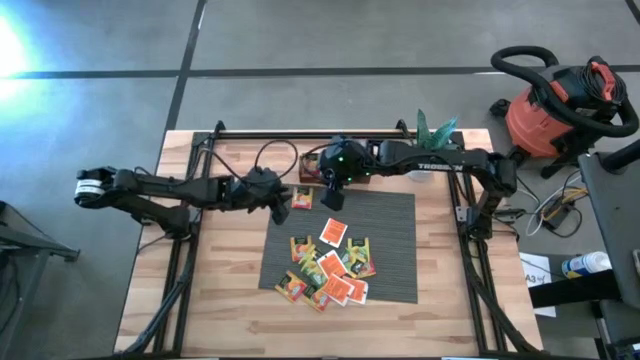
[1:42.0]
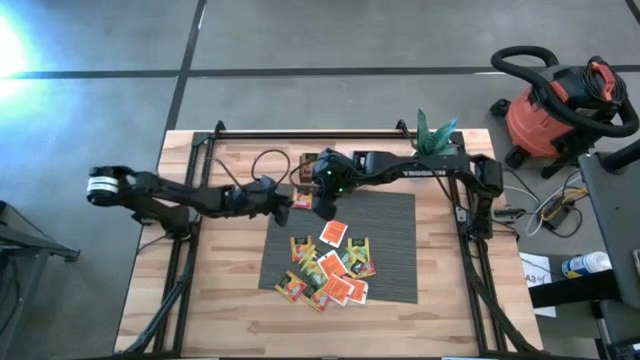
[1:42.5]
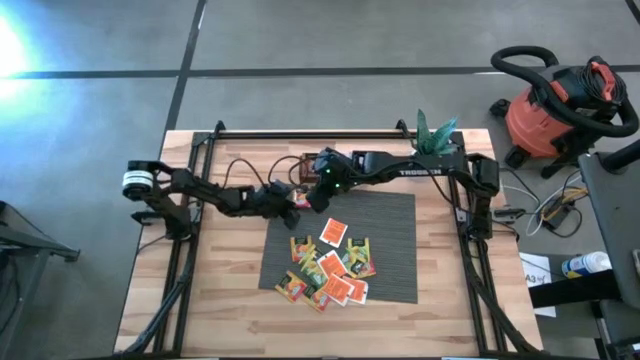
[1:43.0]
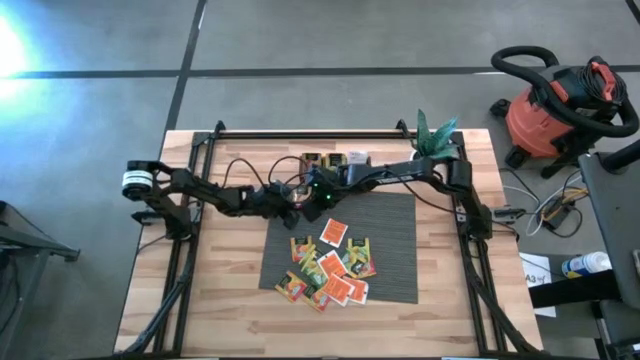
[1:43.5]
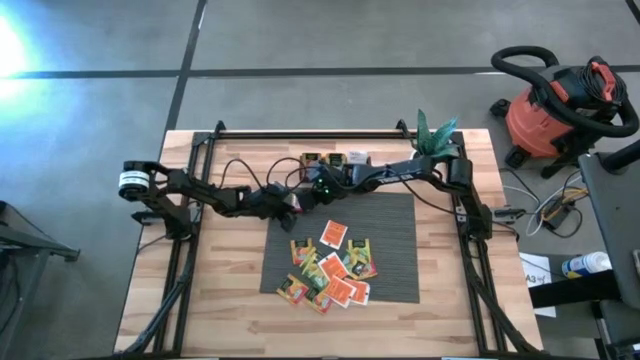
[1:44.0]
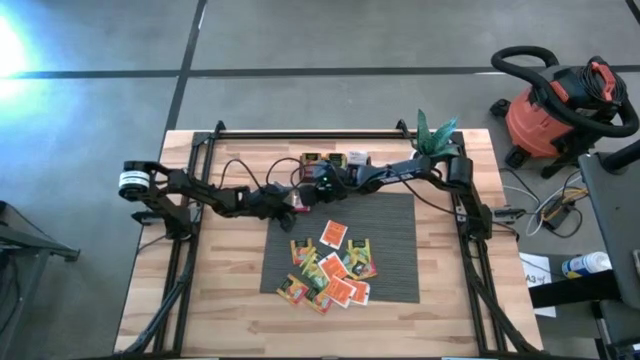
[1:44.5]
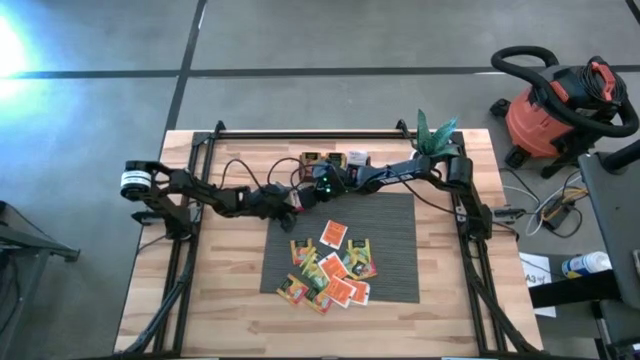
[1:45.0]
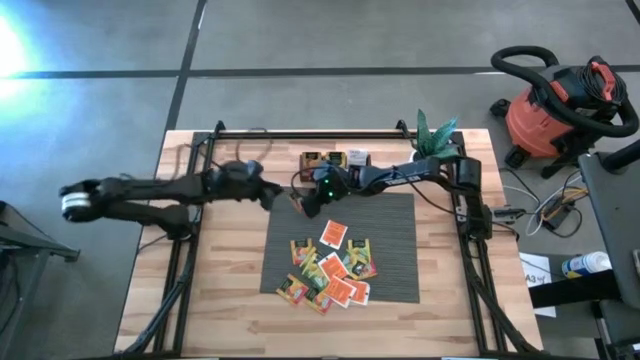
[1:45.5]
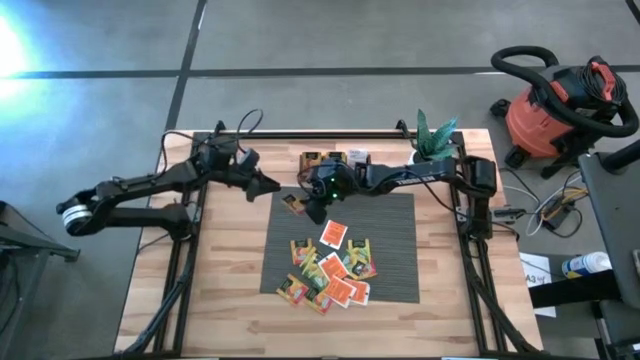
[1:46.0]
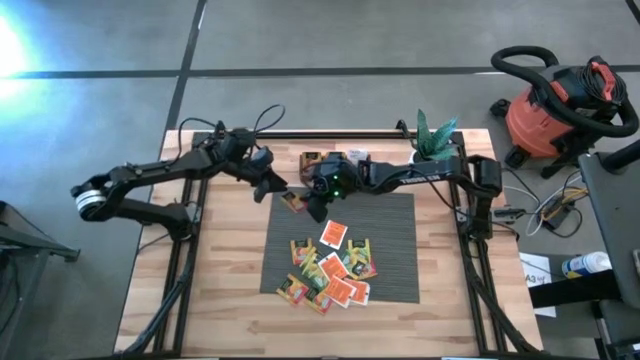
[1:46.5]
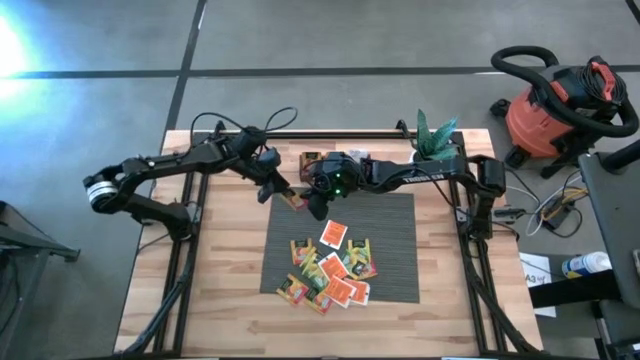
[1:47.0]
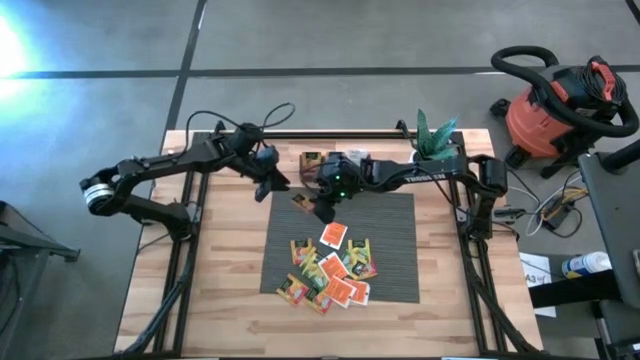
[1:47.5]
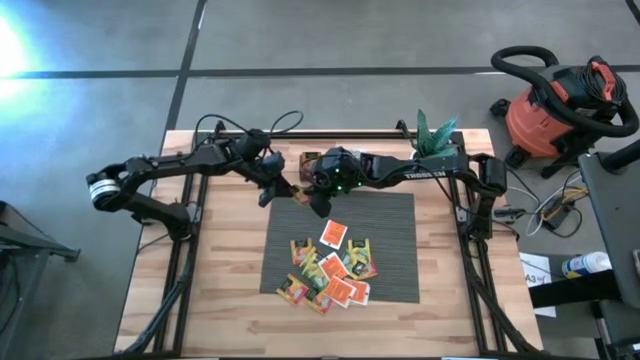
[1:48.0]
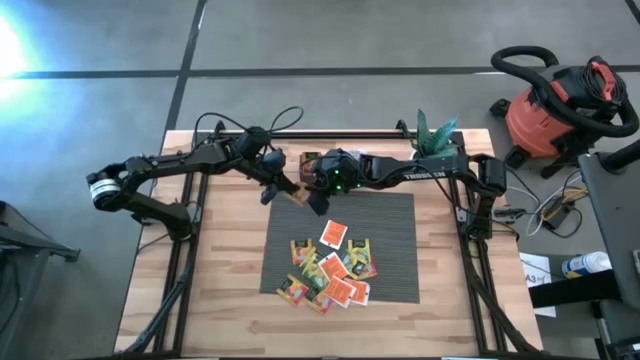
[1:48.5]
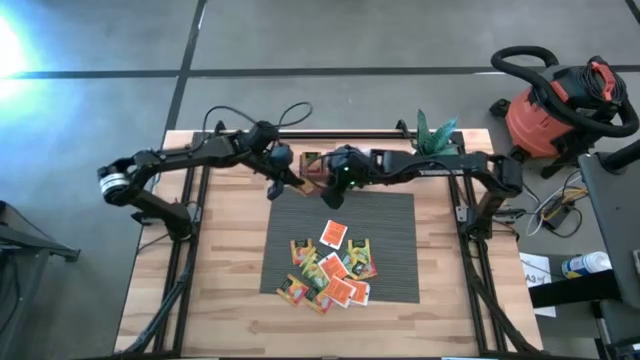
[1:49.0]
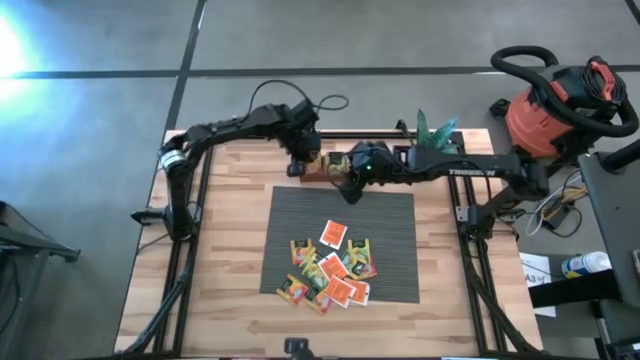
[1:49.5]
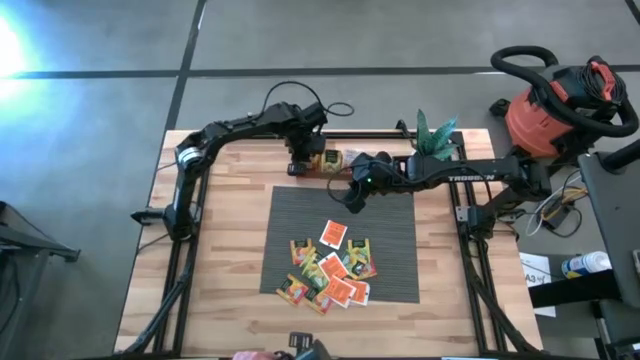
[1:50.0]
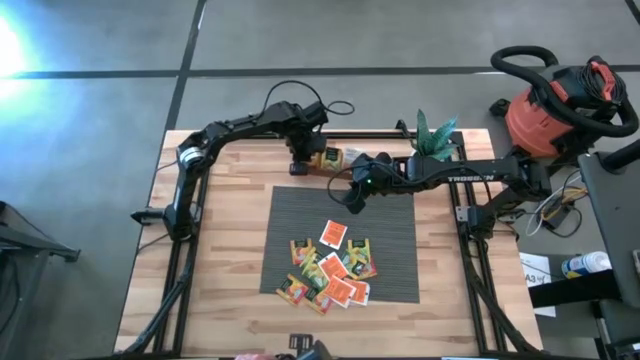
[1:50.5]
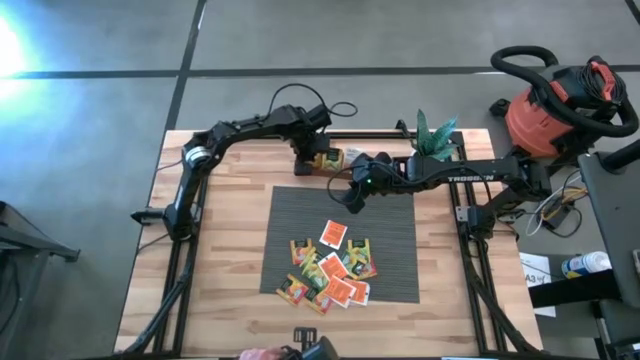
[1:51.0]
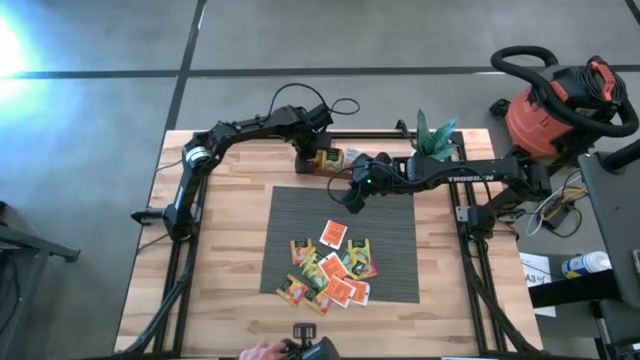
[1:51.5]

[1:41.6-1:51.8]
Task: Pick & Place Tea
Put the orange tea bag into the left section of the wooden organizer

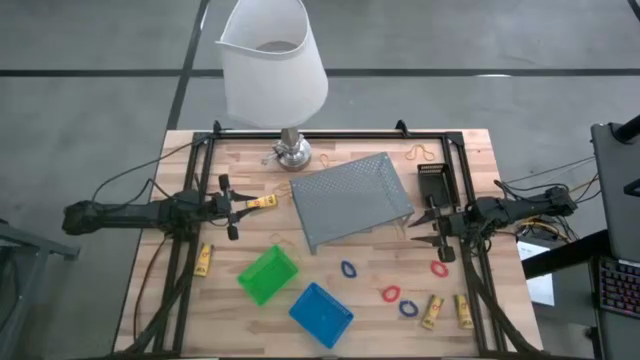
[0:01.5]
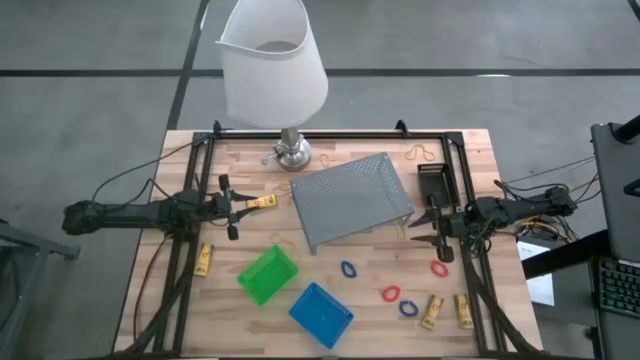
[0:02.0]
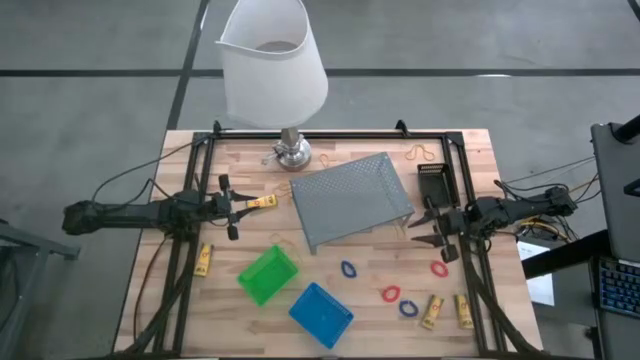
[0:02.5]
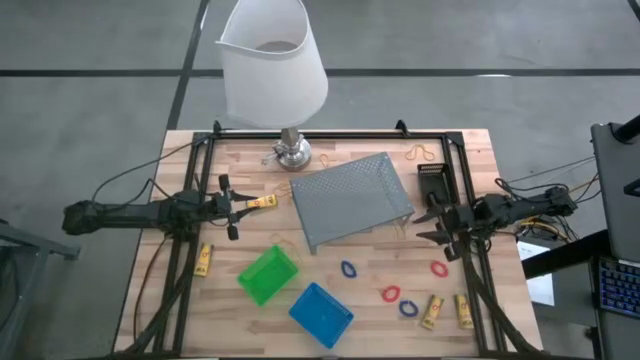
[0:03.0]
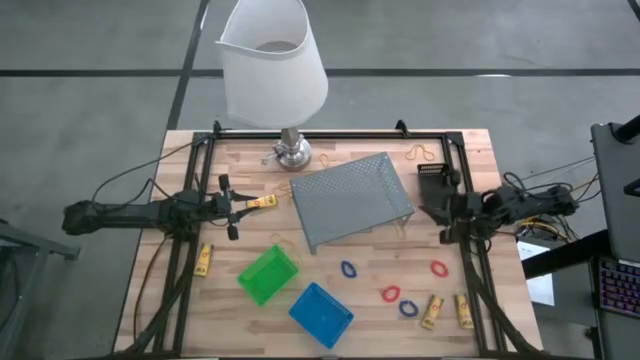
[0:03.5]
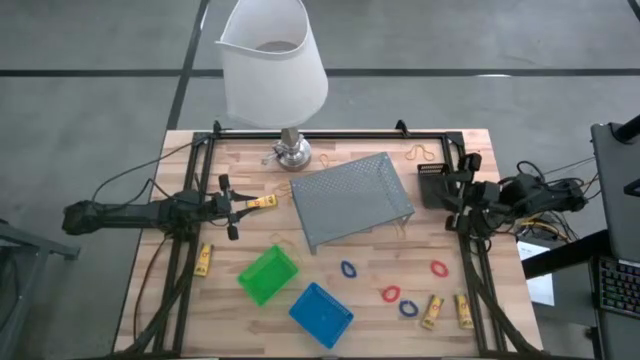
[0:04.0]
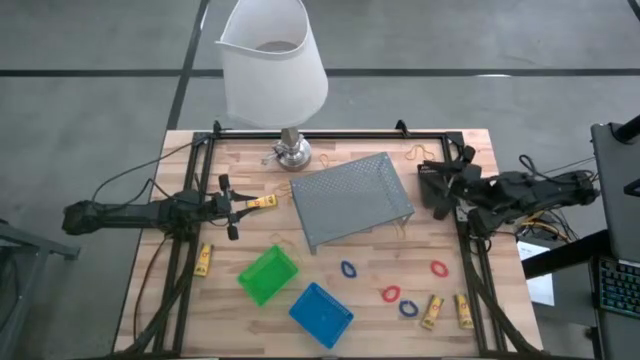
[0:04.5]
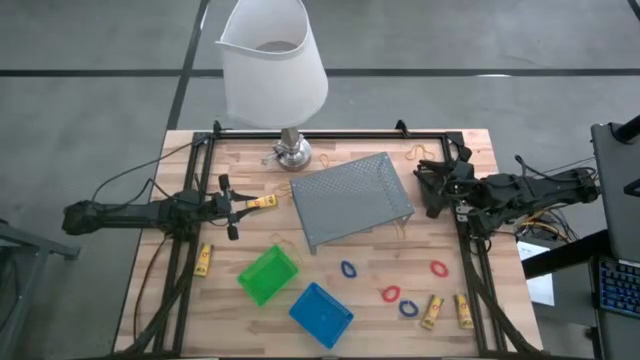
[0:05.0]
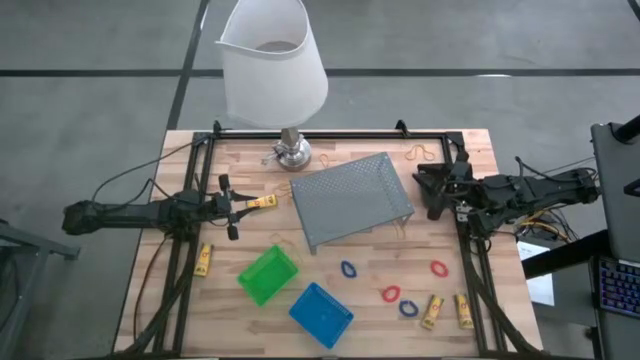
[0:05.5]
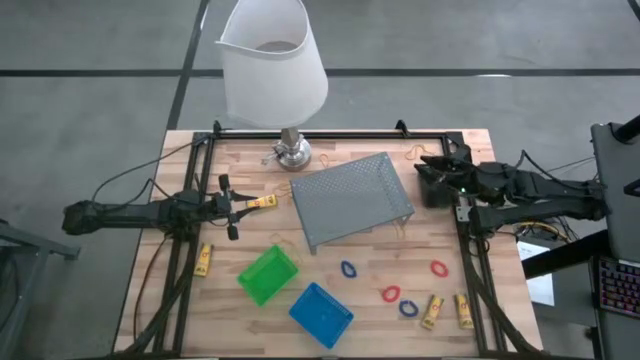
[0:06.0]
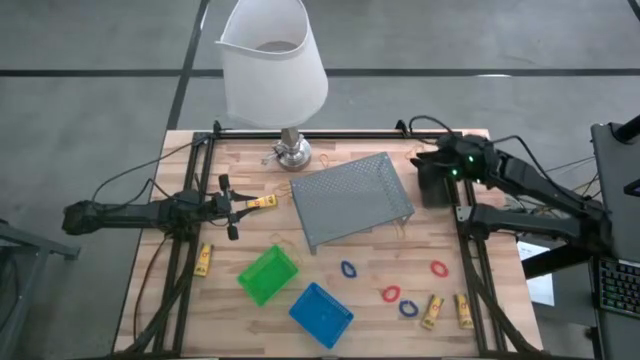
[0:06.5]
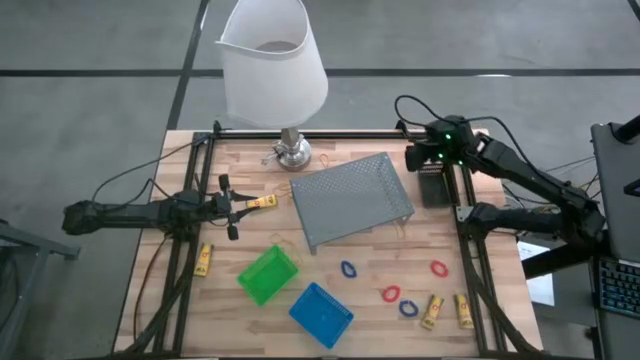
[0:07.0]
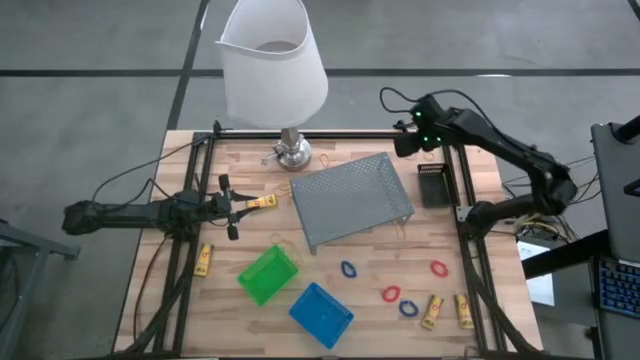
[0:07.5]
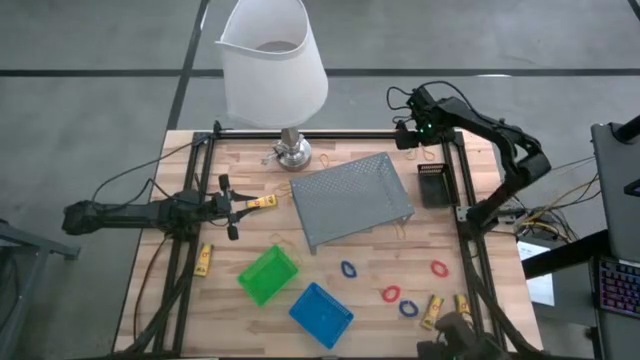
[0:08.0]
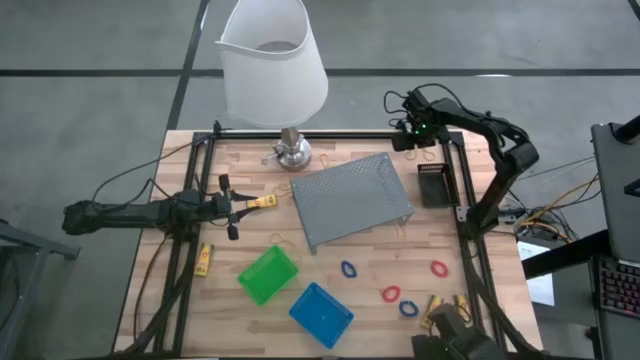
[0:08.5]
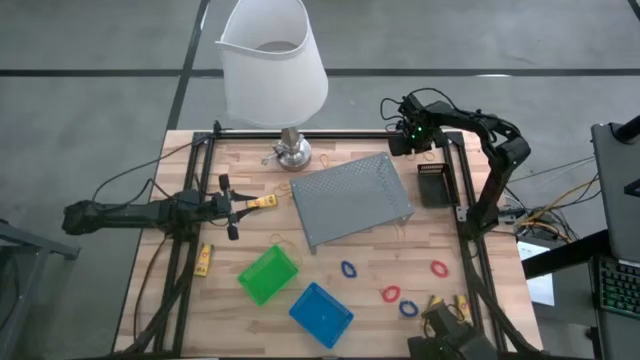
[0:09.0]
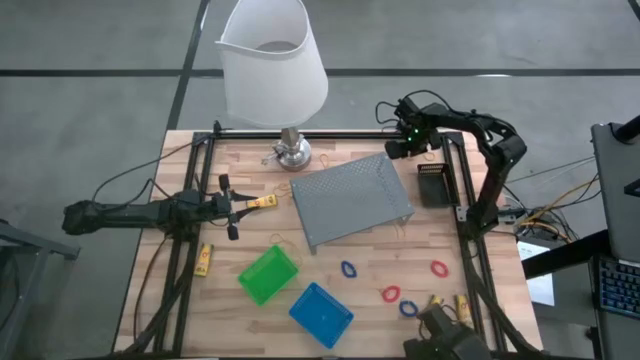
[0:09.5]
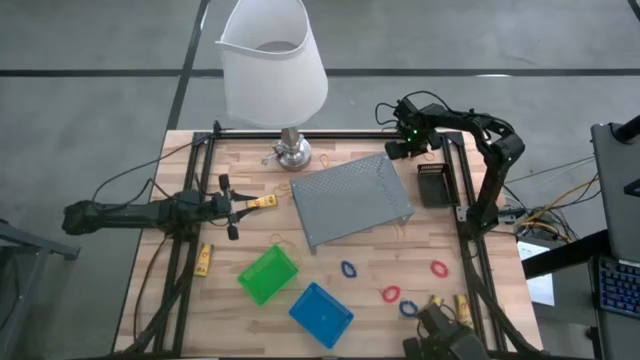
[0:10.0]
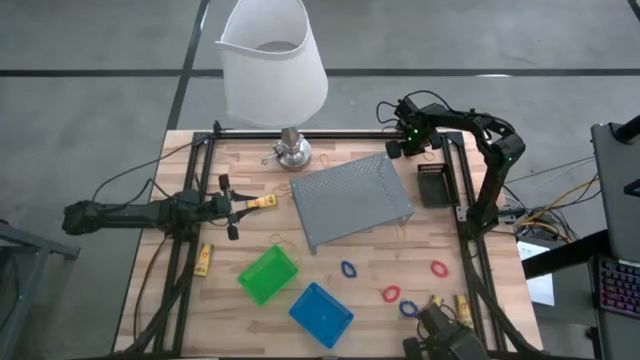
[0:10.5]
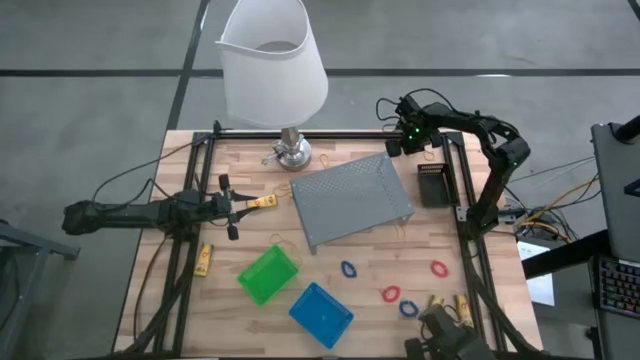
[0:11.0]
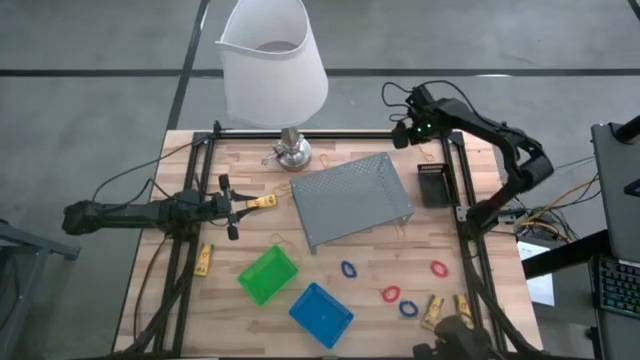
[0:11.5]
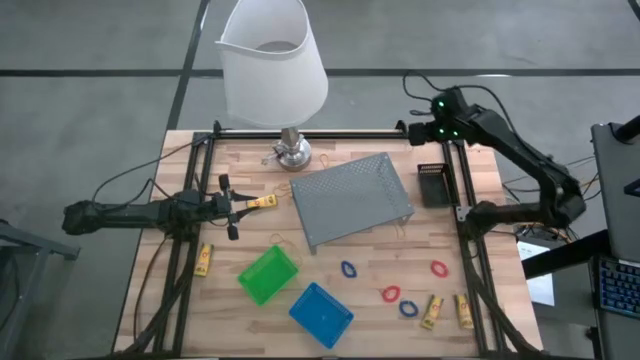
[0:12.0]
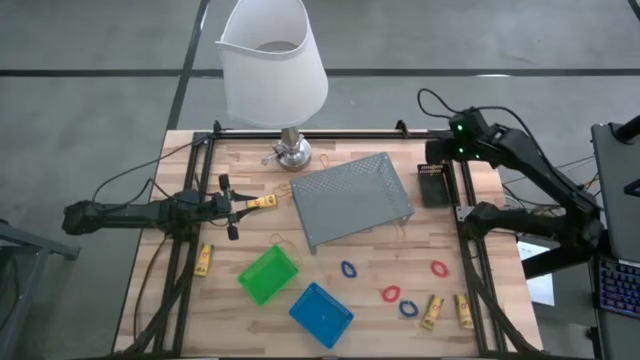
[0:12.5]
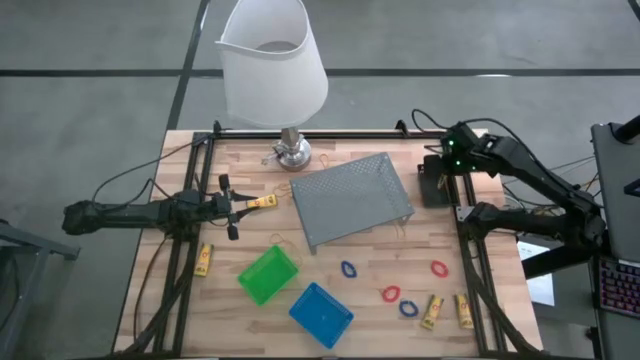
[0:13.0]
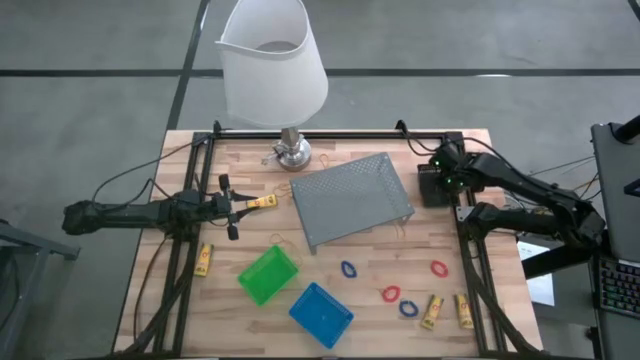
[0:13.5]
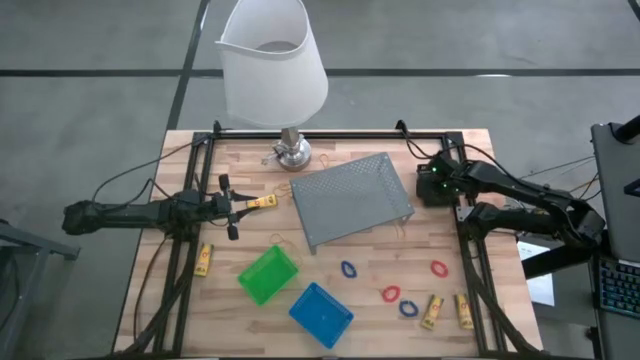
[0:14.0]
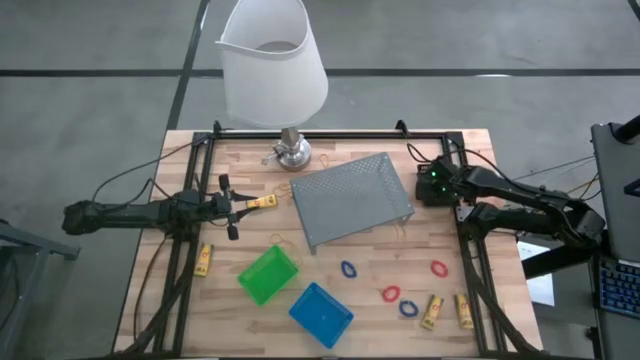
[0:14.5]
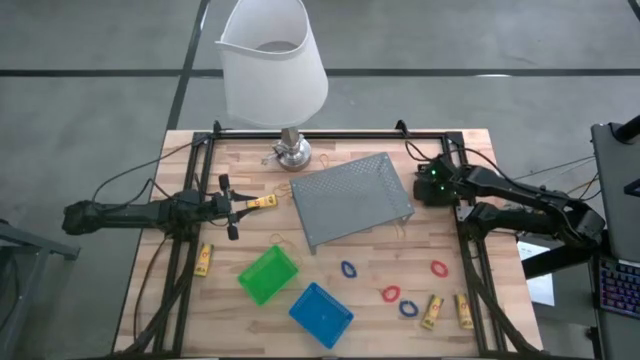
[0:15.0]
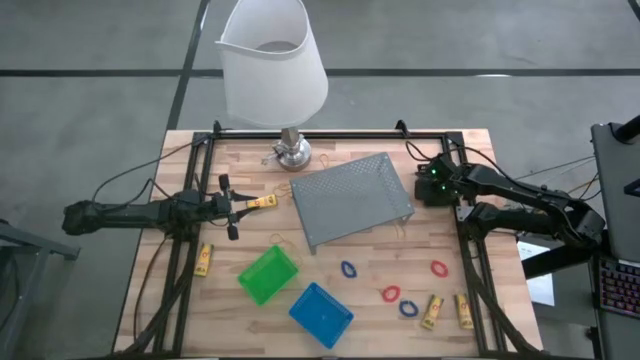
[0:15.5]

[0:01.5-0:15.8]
Task: Pick & Place Office Desk Supplies
Put the yellow rubber band into the black basket
